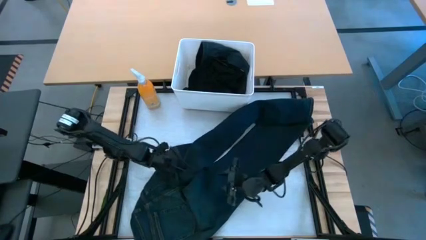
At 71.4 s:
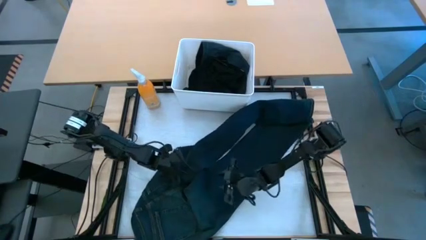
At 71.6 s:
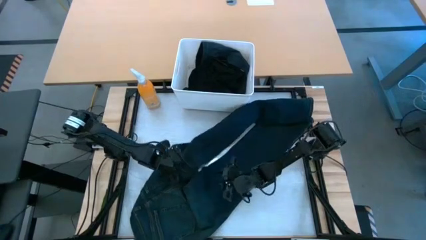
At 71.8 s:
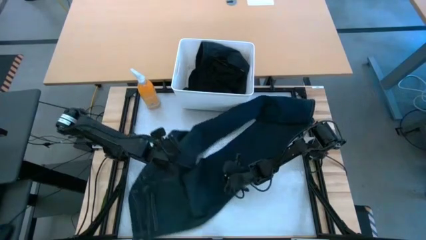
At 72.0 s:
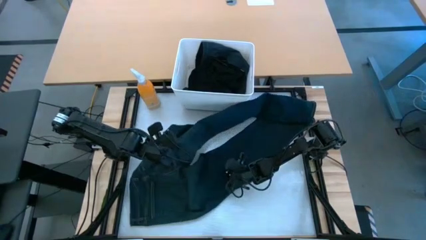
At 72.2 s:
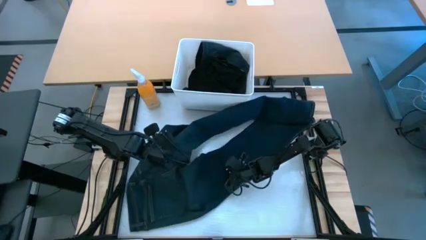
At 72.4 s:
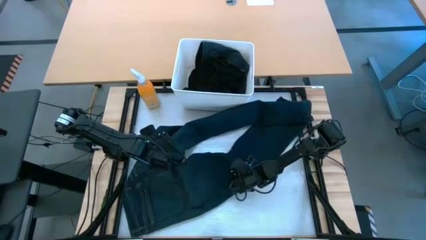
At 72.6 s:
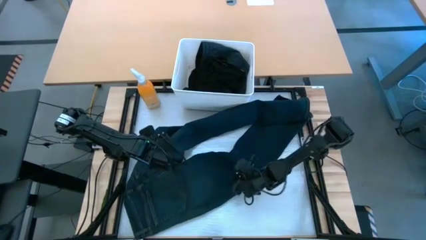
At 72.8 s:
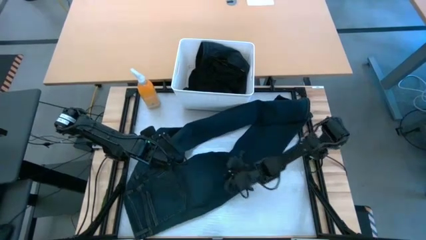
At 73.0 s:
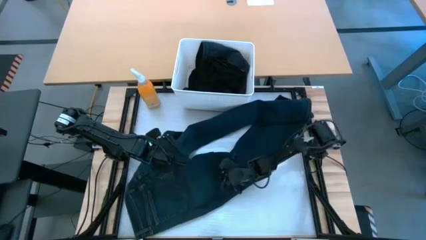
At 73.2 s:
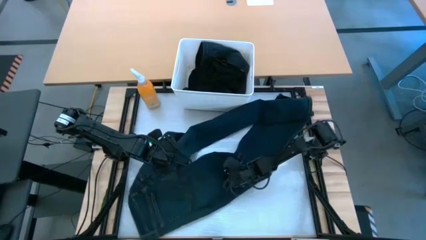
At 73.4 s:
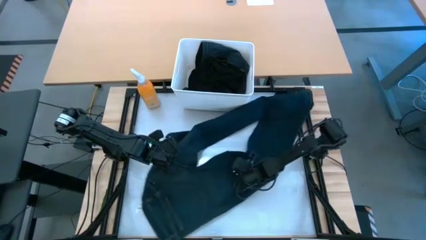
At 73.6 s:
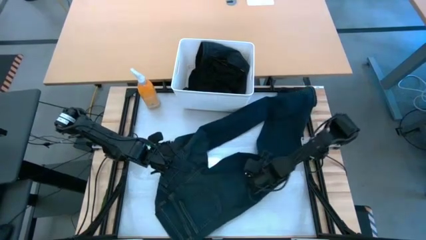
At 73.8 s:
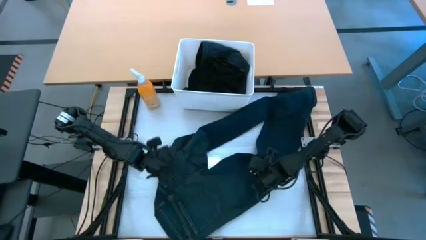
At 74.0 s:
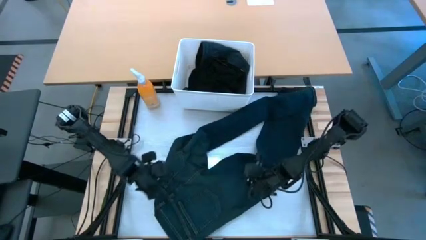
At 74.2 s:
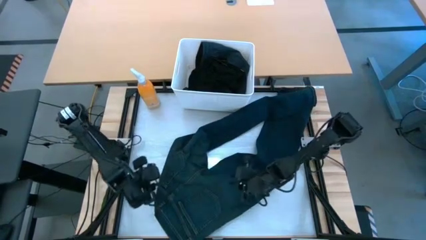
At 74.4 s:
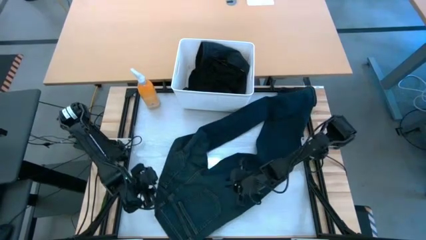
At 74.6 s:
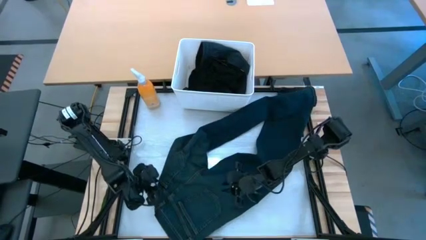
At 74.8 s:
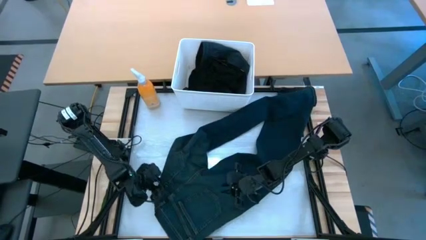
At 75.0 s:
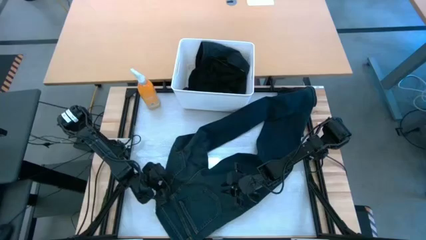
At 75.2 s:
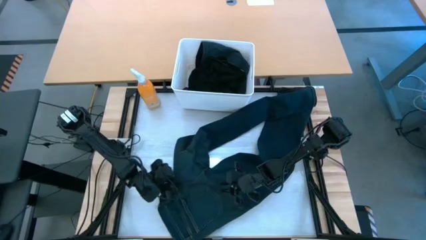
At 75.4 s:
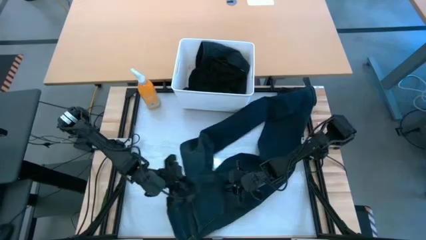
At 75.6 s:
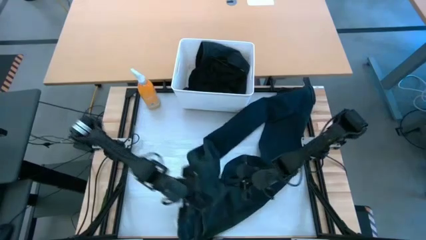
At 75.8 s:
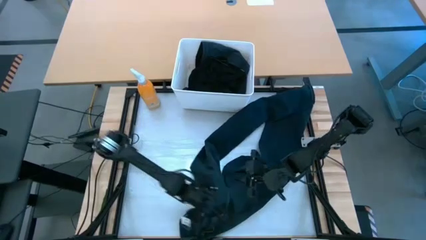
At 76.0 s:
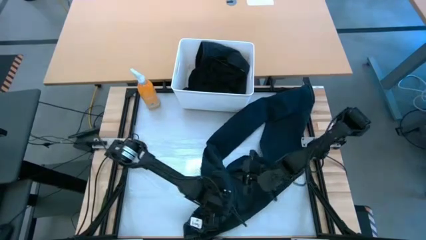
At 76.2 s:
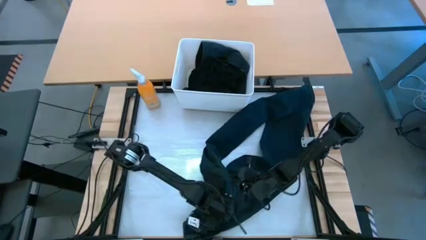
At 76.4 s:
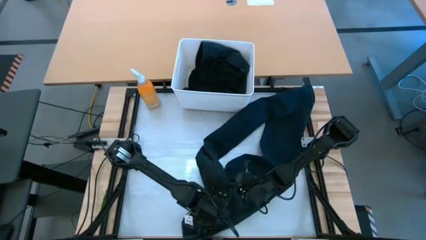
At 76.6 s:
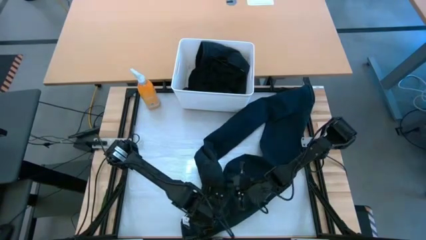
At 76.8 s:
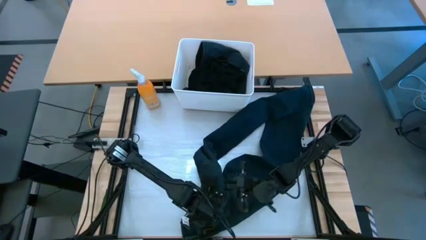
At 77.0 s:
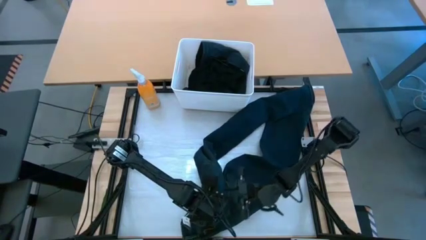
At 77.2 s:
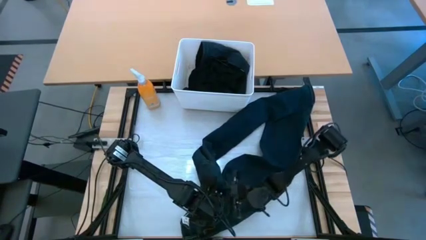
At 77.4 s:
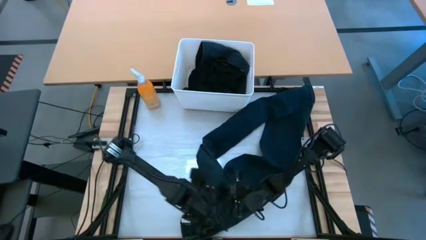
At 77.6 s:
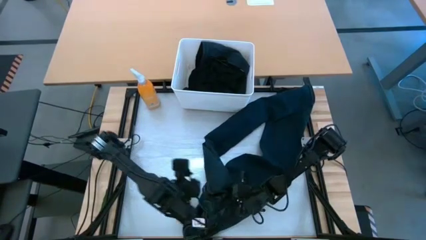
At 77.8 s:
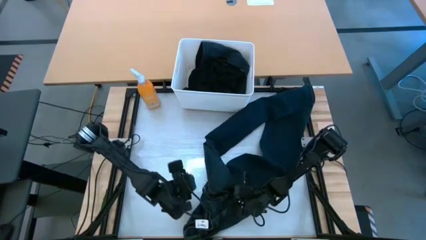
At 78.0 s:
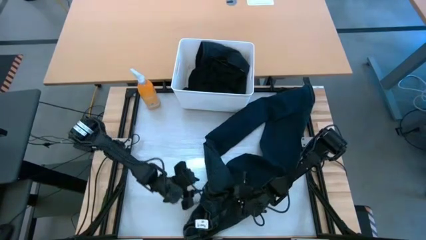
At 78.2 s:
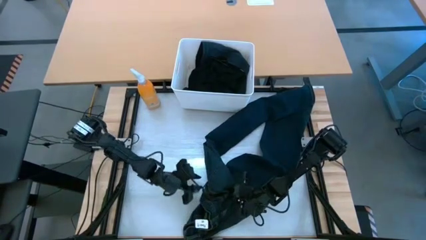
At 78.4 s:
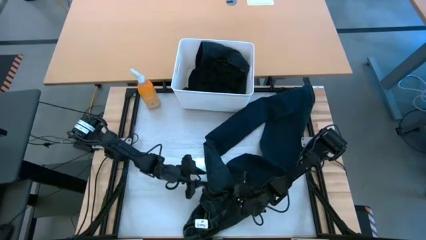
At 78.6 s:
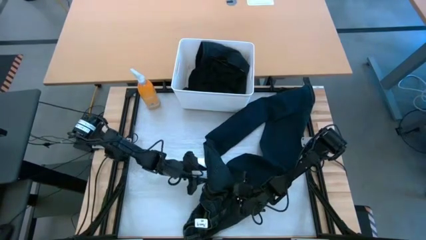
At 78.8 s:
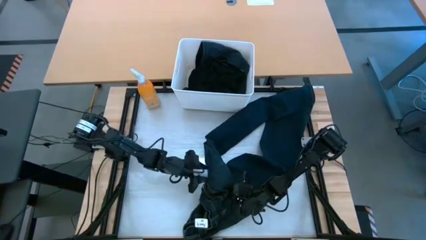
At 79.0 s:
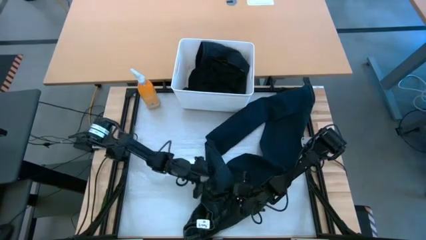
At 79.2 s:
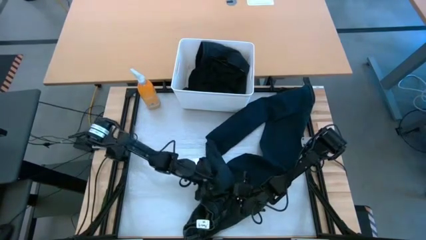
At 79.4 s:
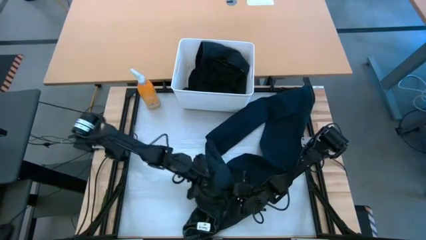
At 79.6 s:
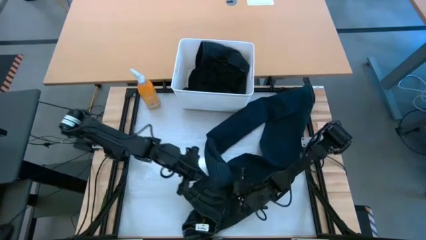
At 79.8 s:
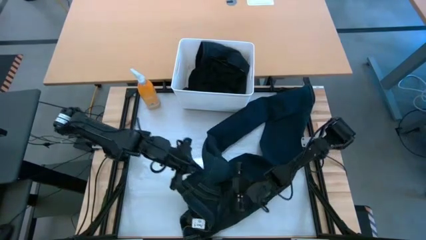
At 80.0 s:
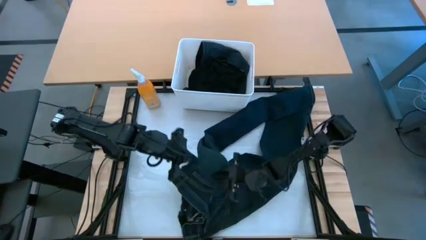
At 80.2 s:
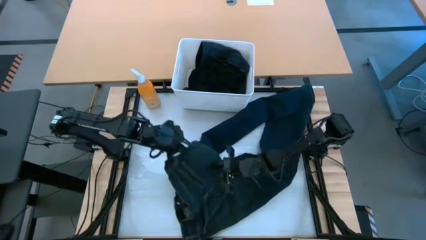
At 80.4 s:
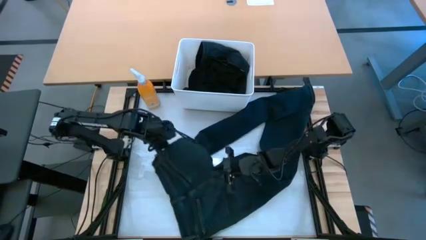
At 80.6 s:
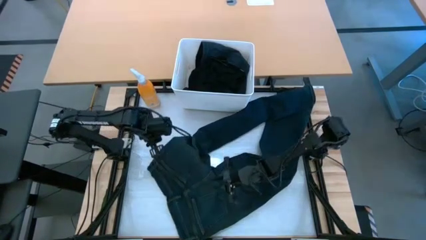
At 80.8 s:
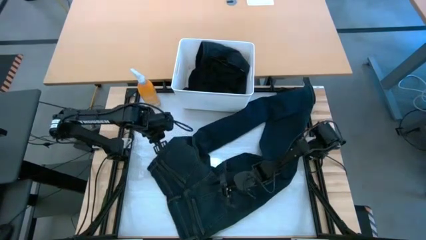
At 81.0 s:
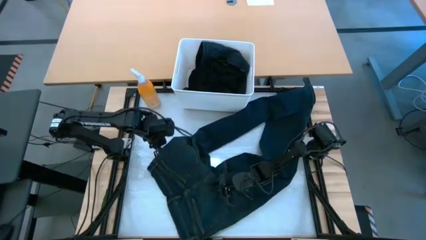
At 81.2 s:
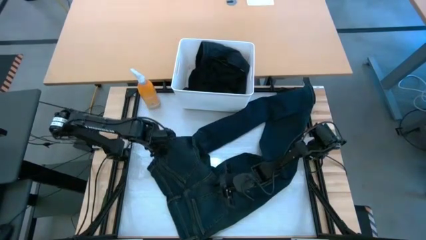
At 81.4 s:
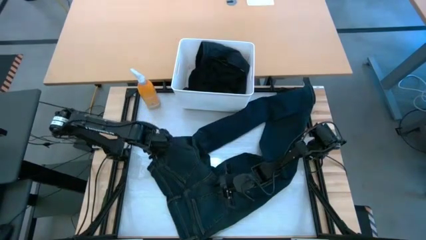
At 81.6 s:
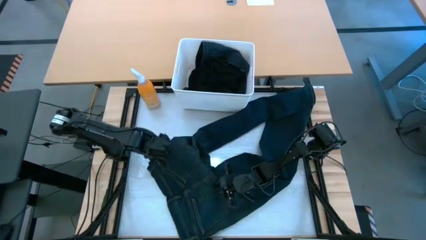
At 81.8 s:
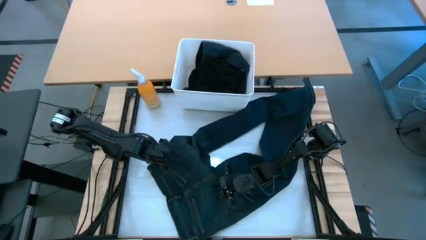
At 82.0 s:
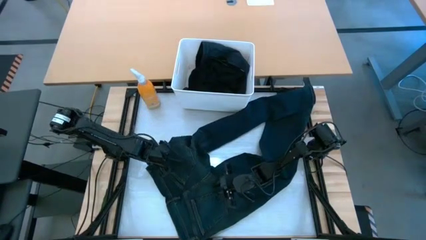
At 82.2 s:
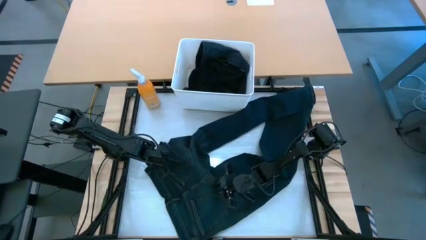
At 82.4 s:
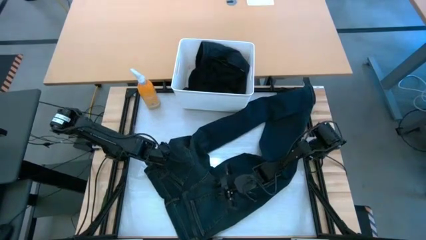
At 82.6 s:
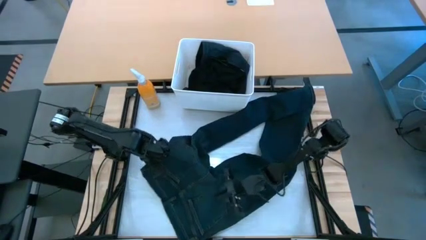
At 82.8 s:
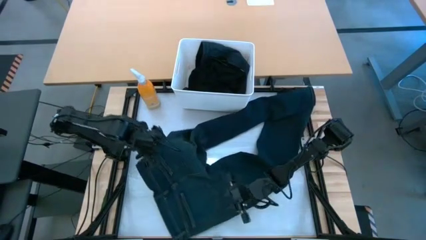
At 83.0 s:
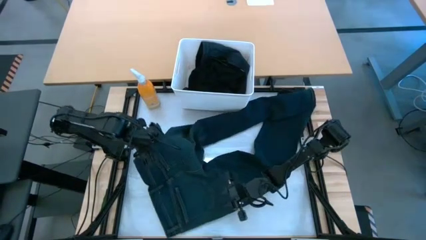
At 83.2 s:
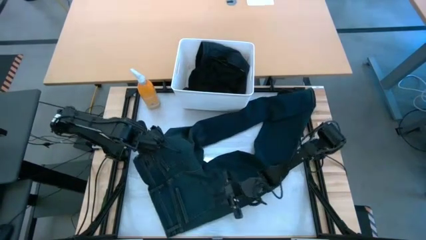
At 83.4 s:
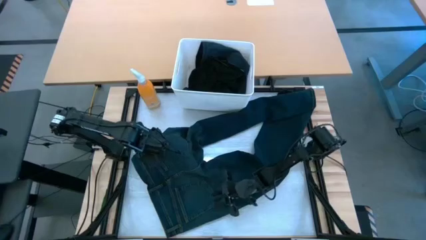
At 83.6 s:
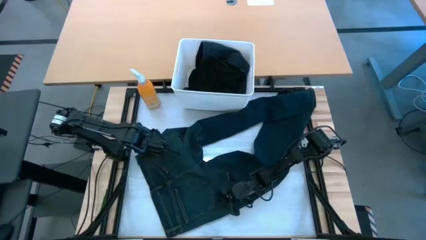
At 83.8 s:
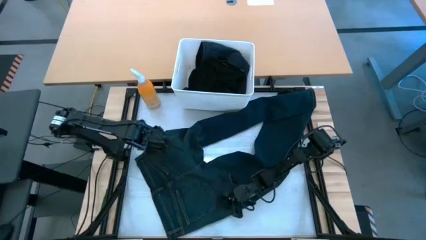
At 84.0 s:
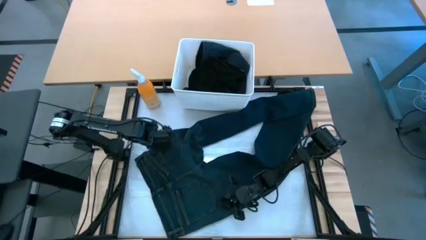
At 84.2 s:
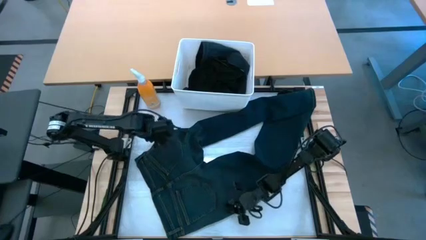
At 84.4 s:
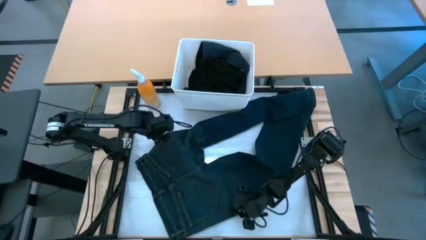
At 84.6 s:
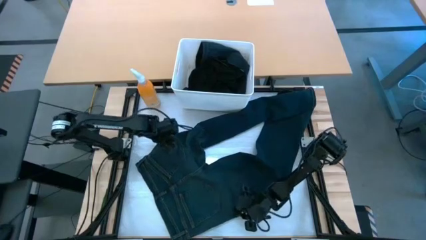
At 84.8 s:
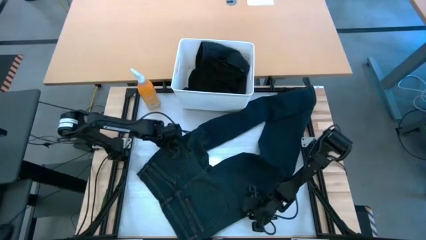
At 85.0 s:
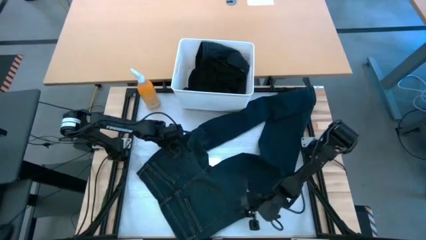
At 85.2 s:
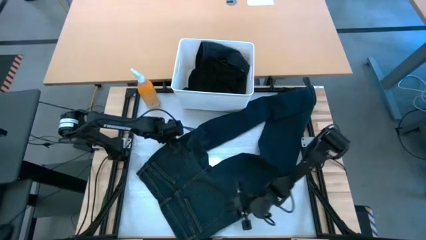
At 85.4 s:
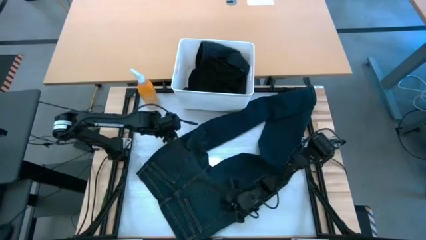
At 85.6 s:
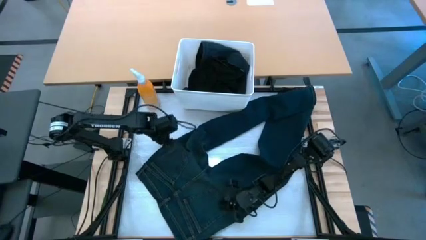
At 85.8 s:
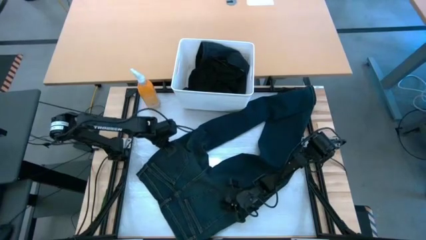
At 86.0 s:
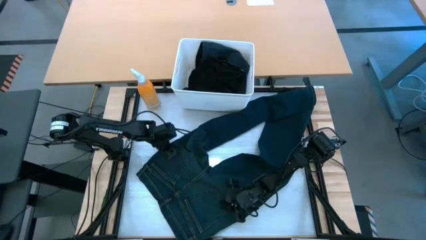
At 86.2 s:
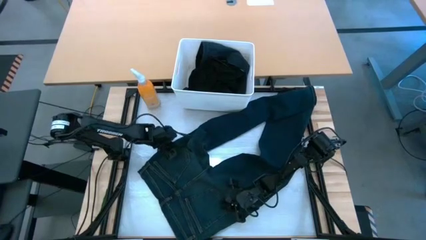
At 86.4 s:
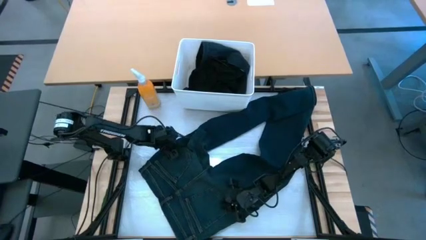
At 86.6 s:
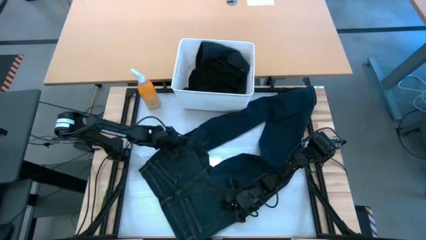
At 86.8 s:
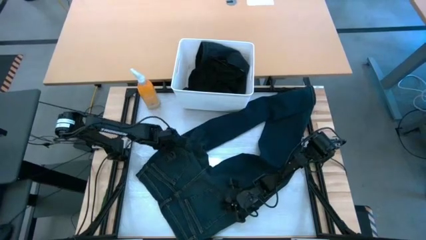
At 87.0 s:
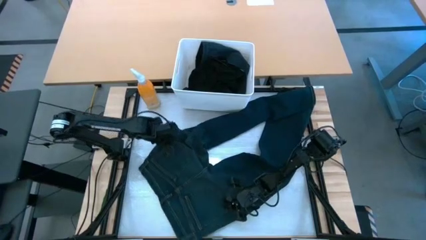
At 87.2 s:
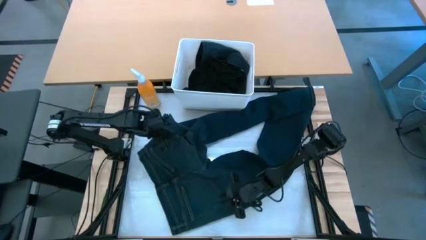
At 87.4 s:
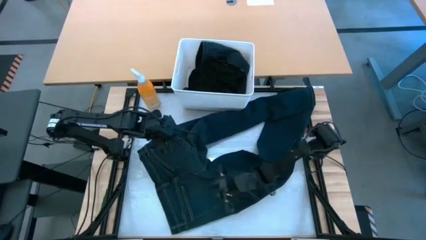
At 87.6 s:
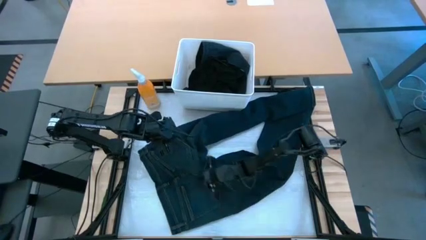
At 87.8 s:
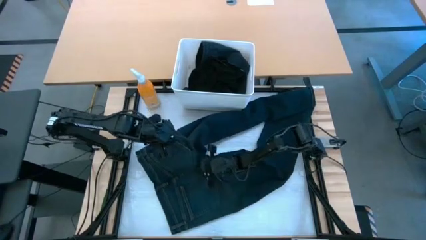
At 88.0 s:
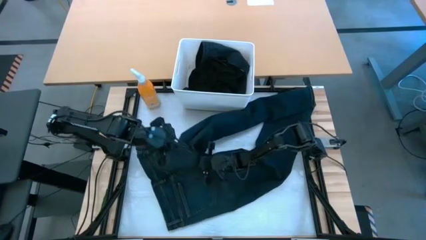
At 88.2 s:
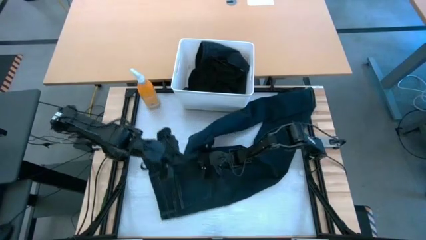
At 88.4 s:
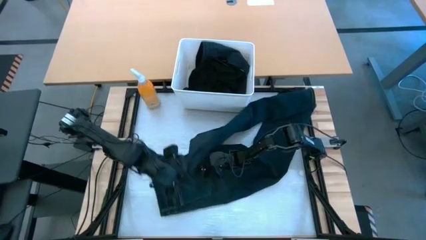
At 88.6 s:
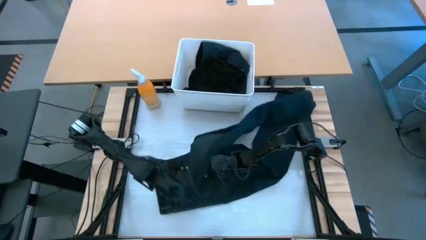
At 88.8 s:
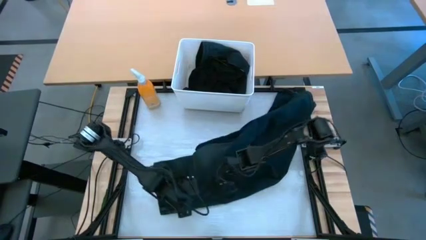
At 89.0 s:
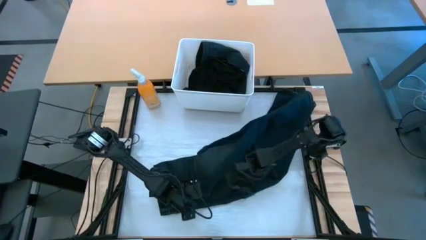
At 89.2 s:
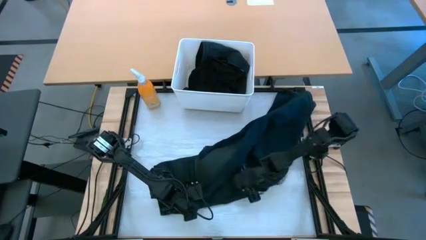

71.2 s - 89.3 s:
Task: Fold laundry
Fold the blue long pants
